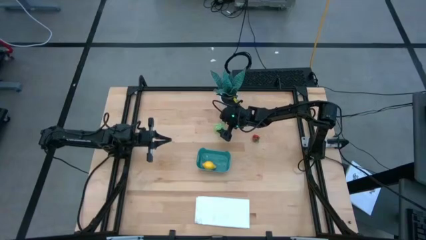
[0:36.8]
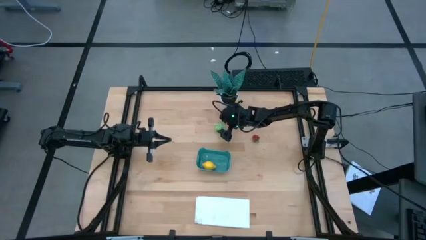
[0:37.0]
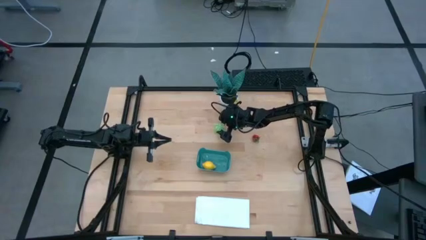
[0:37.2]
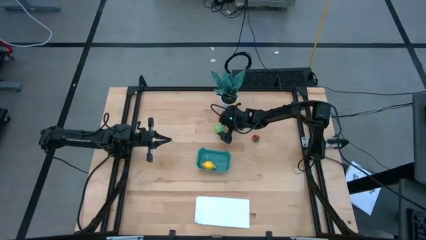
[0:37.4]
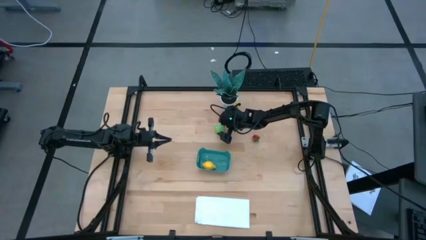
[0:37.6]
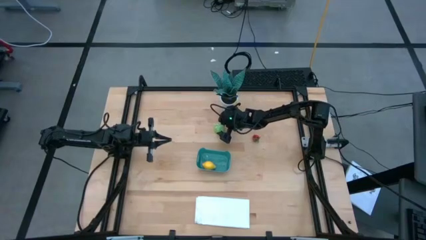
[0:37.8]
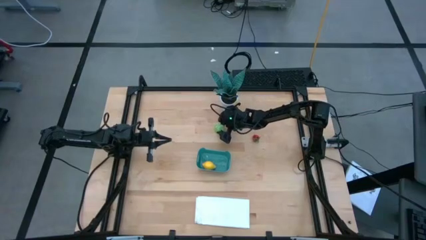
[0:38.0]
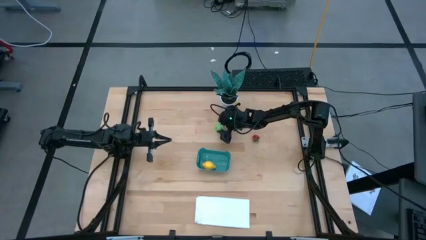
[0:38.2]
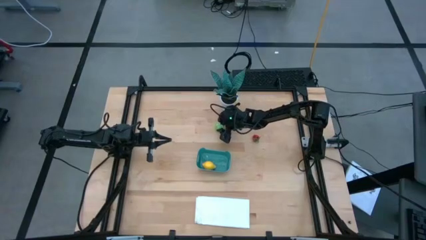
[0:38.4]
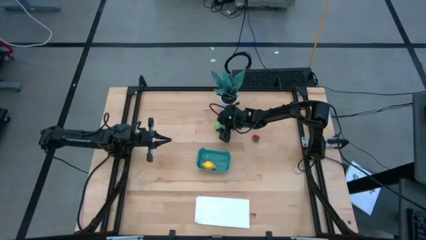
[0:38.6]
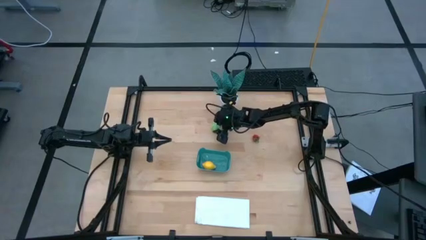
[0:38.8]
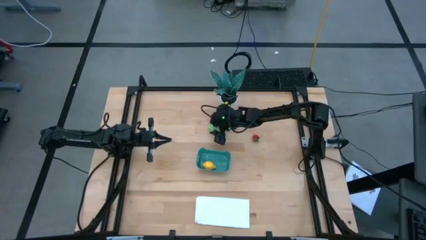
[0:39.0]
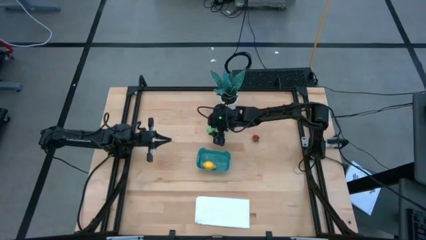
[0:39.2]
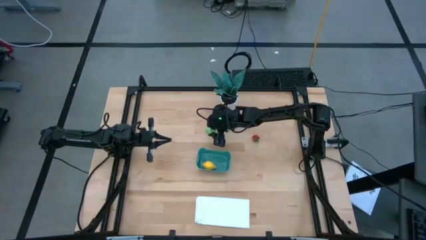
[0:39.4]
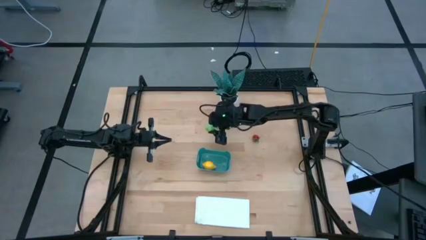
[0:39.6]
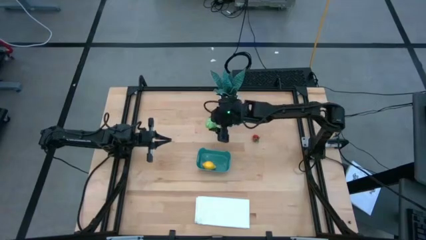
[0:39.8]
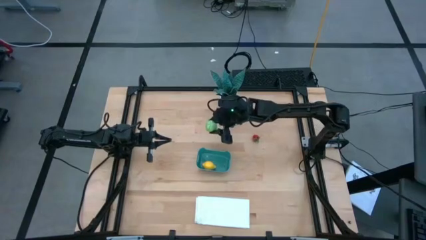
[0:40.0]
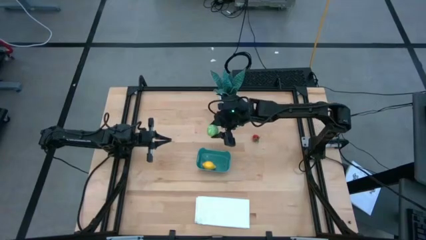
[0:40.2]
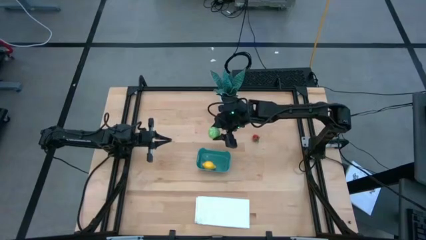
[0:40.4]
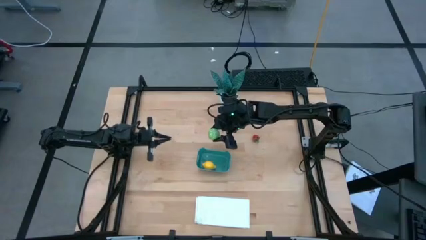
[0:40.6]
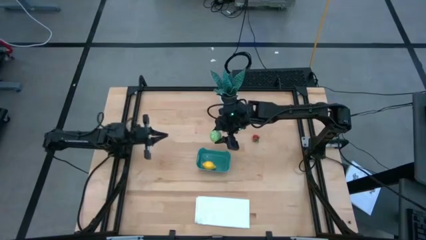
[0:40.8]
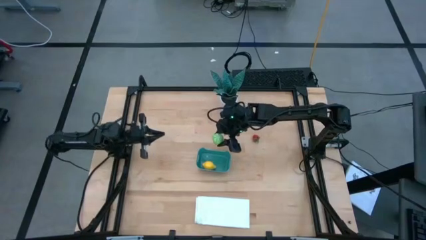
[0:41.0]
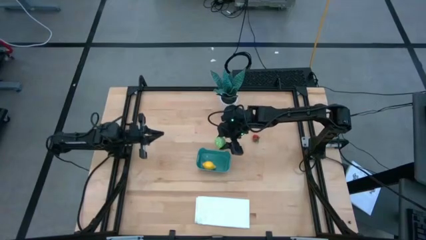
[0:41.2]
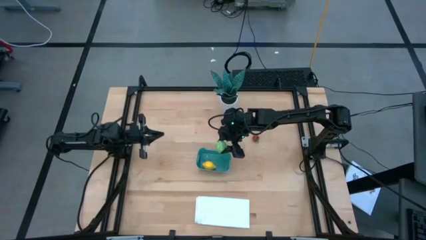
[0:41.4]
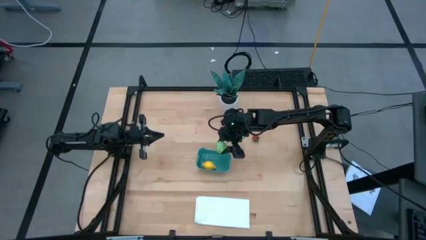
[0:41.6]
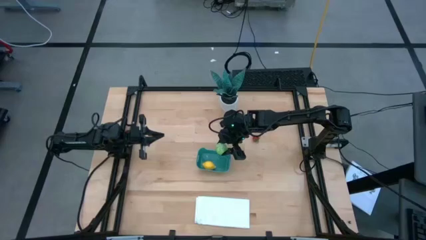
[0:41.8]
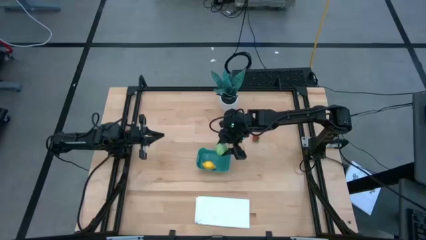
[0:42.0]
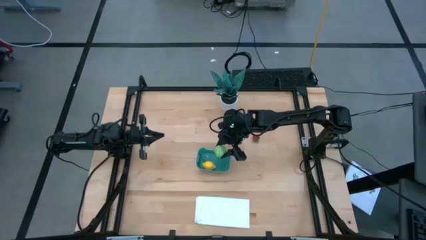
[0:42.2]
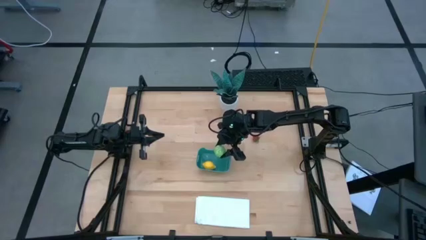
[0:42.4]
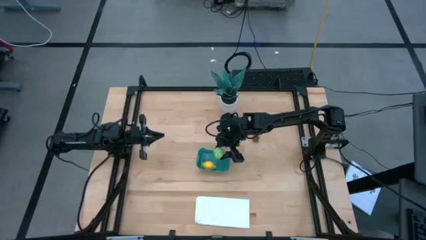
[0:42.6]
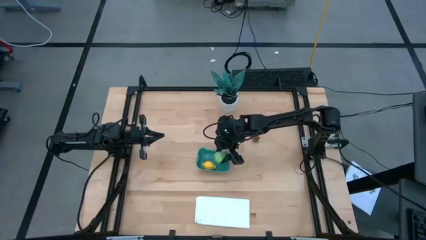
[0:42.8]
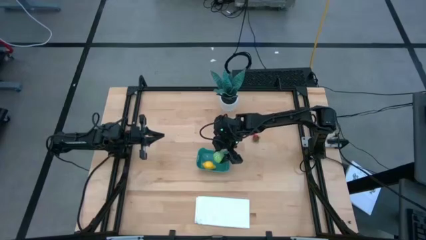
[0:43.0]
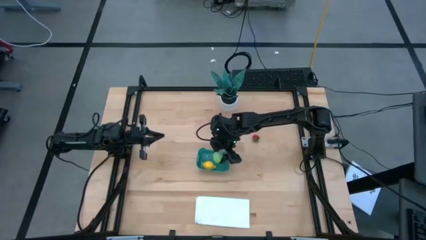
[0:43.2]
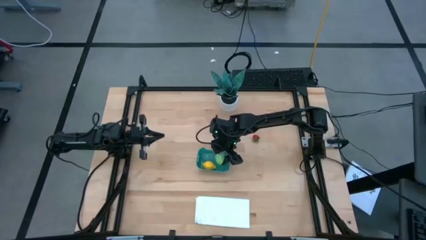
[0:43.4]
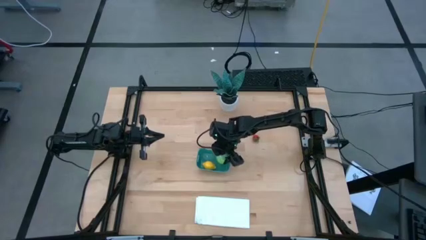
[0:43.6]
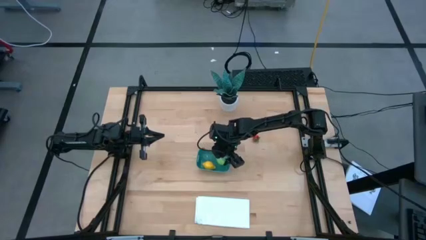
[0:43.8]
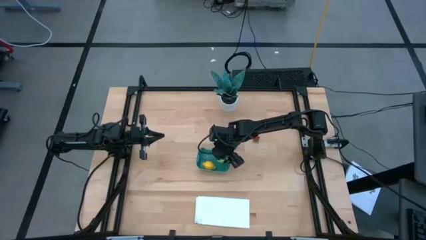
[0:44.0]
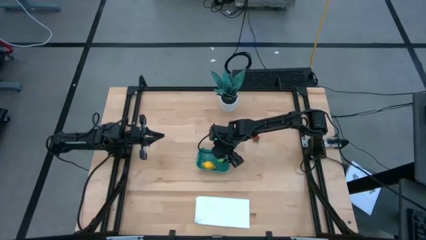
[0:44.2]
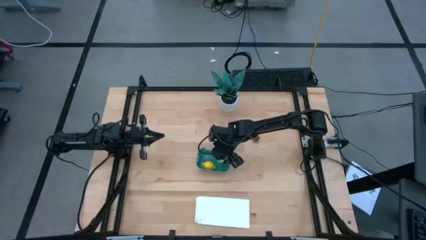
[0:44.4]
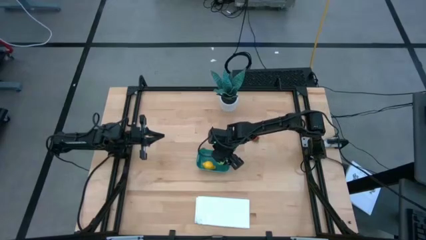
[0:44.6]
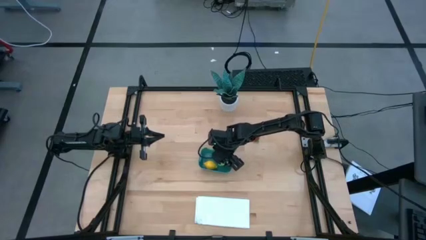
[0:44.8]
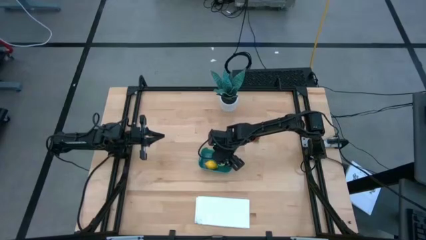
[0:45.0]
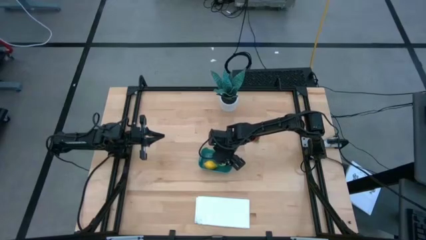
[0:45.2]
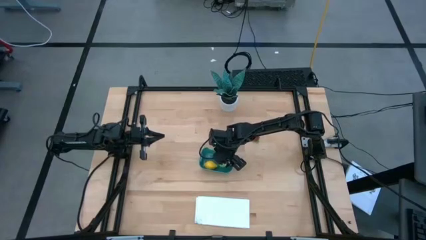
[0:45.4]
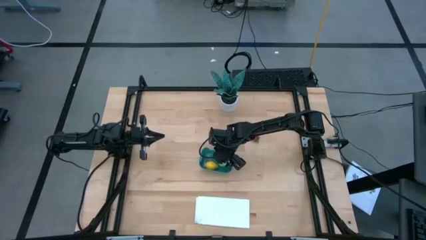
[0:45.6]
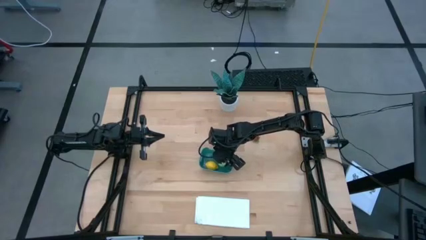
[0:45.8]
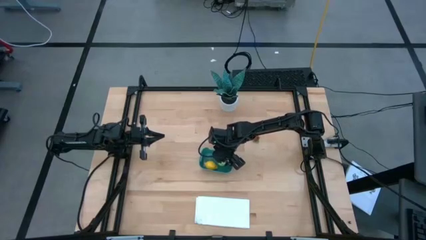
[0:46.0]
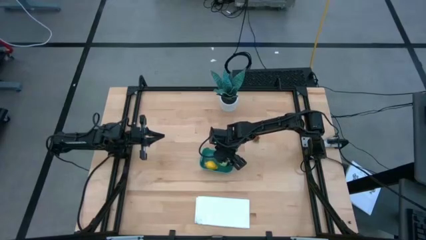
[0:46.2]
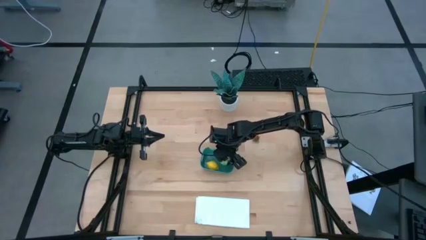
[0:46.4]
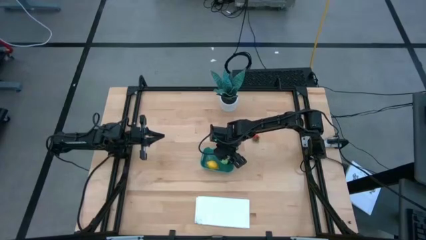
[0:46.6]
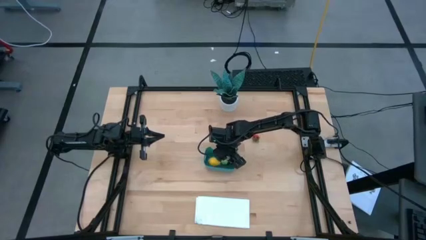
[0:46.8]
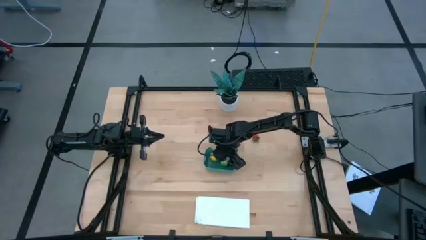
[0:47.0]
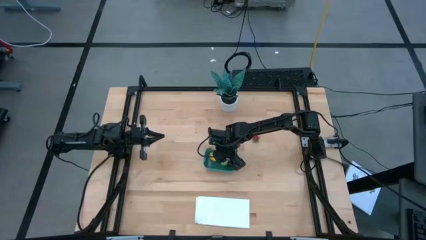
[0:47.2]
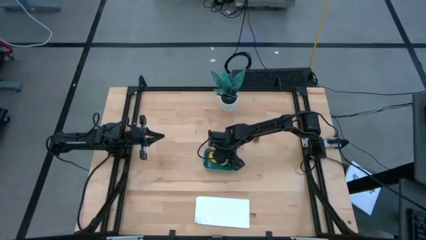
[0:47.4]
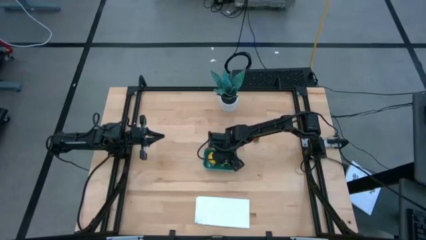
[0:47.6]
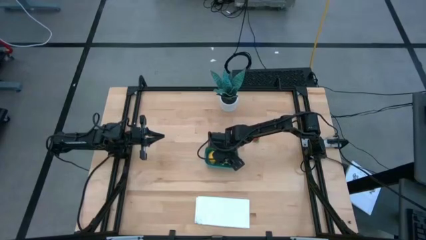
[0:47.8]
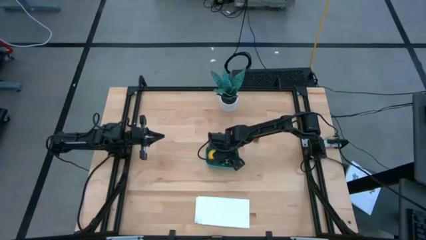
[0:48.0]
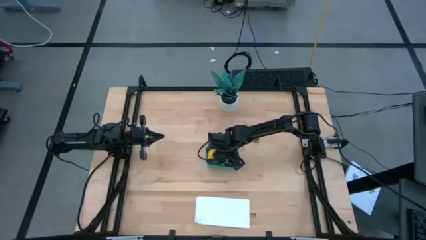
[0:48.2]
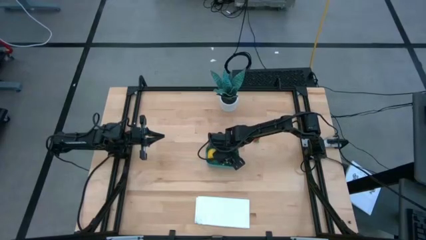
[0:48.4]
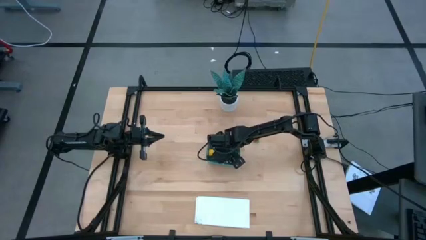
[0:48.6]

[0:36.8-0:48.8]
Task: Pick and placing Produce into tupperware
Put the green cabbage into the blue basket

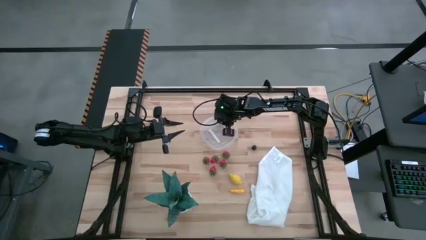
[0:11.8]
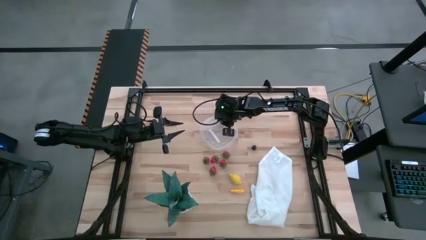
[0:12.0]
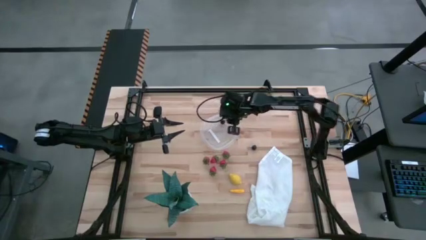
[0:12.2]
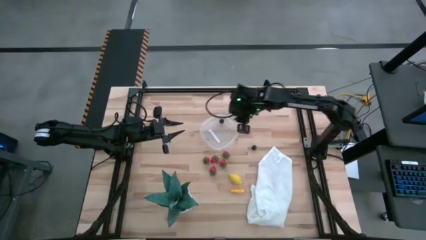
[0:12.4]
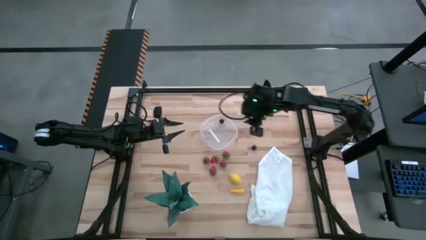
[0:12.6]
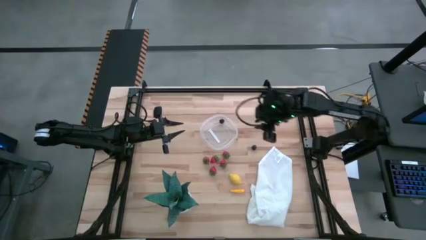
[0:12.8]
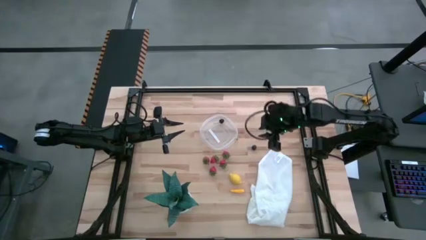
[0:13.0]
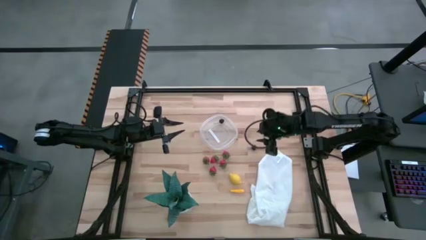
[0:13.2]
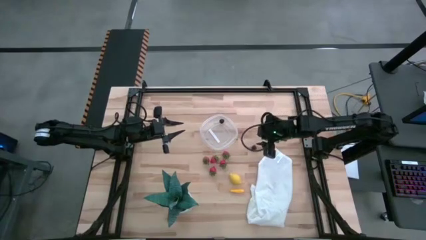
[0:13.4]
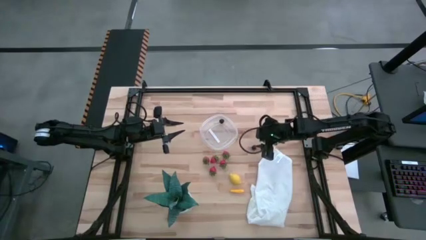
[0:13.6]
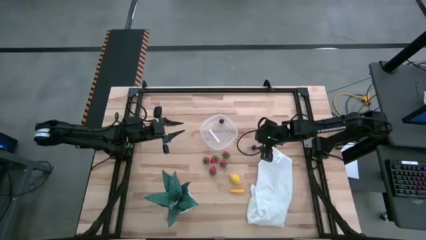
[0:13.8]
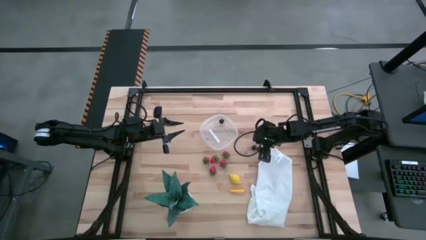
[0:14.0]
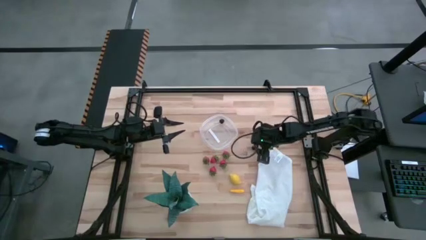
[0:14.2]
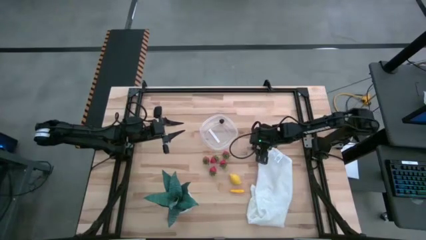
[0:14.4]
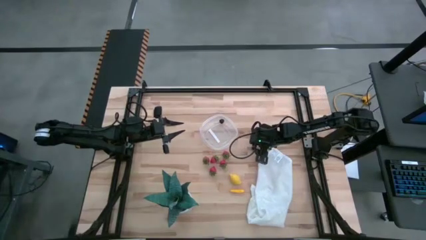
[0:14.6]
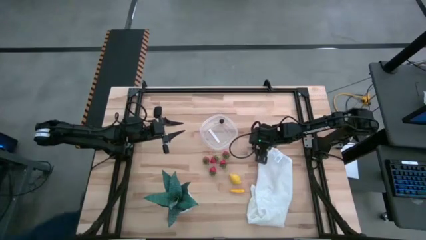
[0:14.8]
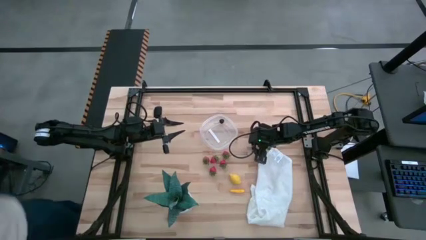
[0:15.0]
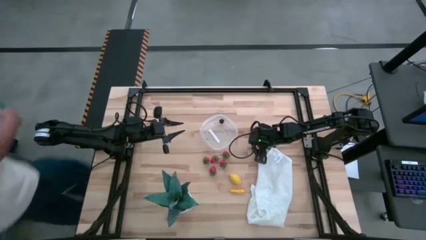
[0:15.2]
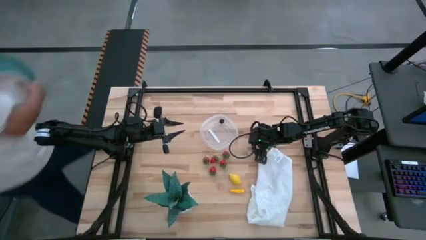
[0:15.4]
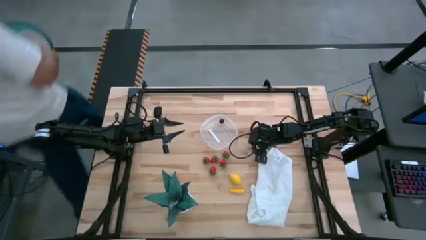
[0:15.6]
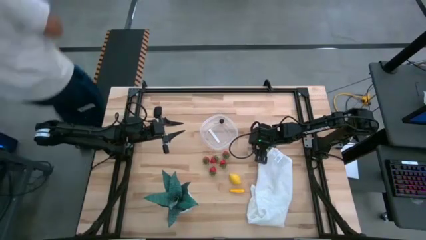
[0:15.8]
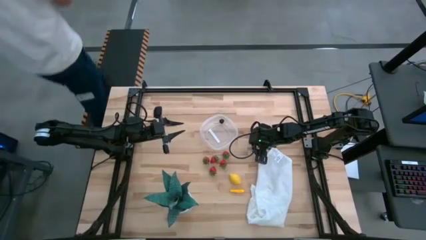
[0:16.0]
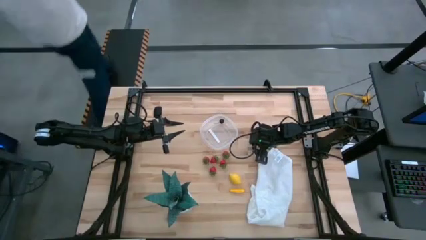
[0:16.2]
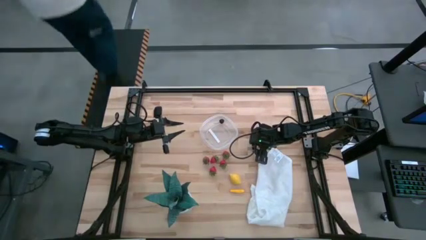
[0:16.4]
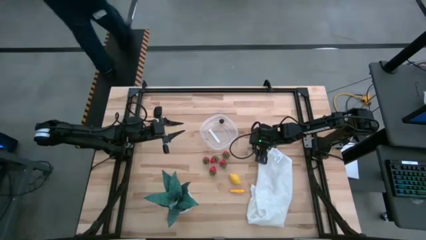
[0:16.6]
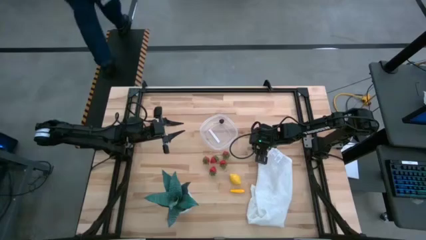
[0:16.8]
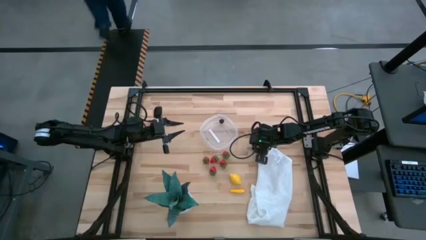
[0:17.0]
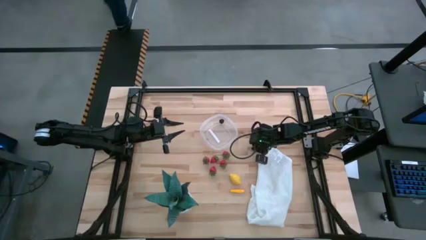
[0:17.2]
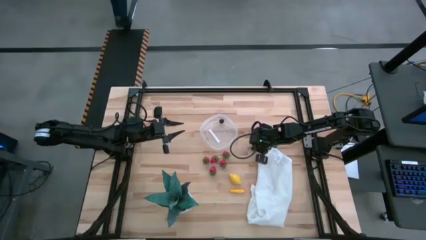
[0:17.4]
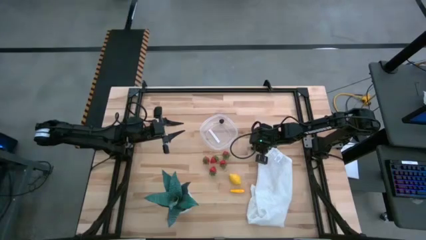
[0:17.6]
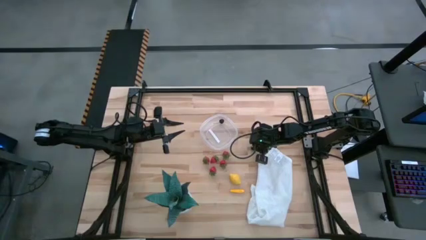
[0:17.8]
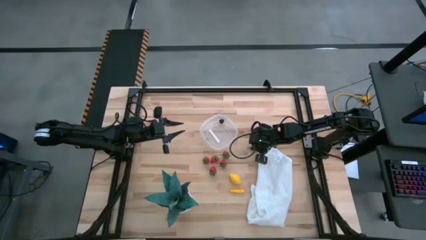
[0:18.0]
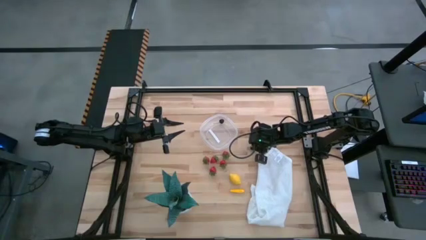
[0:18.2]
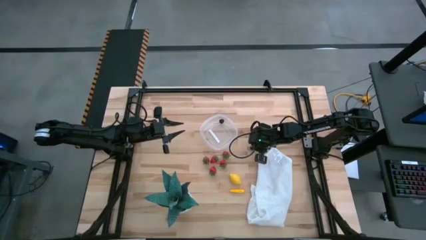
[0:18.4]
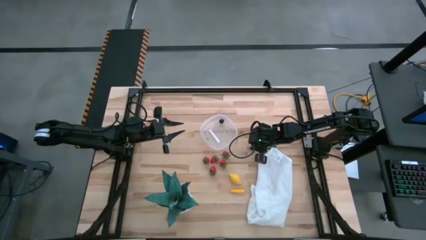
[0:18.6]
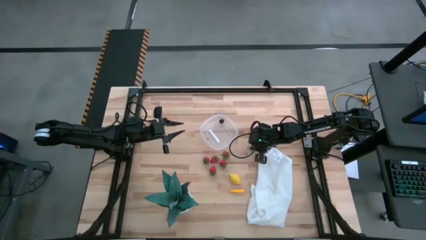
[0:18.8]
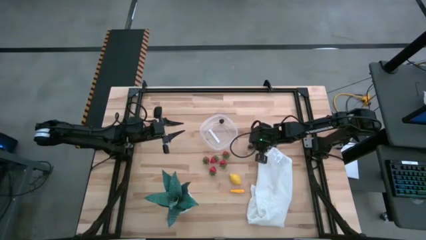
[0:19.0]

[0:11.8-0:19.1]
Task: Pick and placing Produce into tupperware
Put the blackberry into the bin
